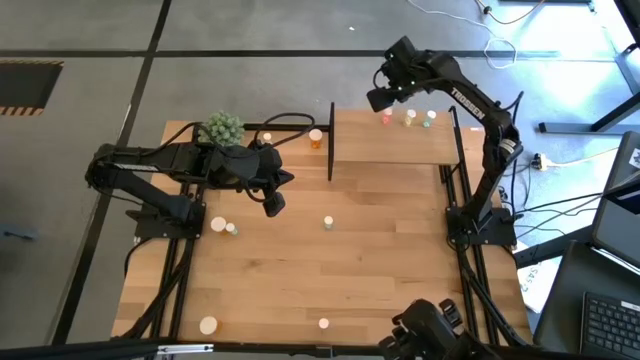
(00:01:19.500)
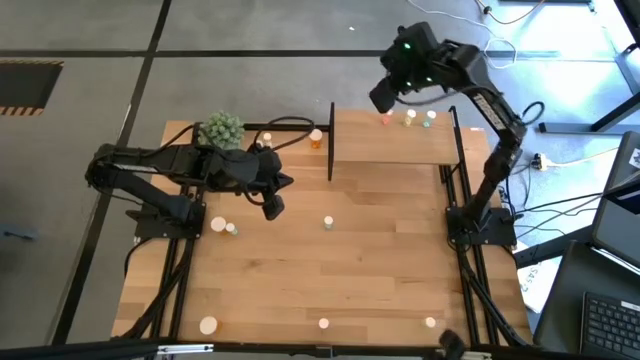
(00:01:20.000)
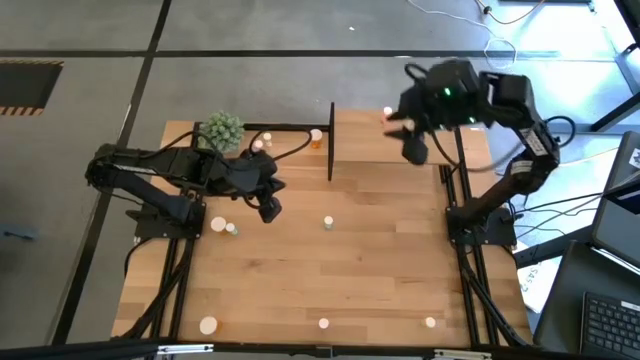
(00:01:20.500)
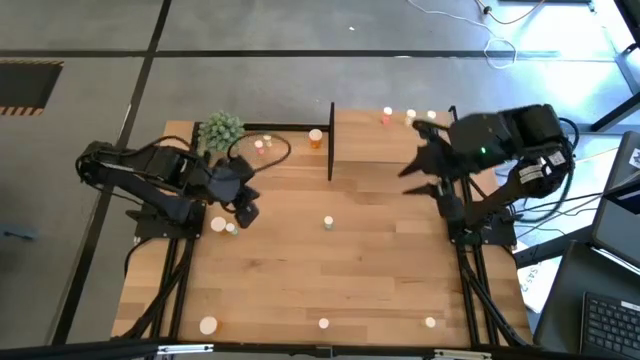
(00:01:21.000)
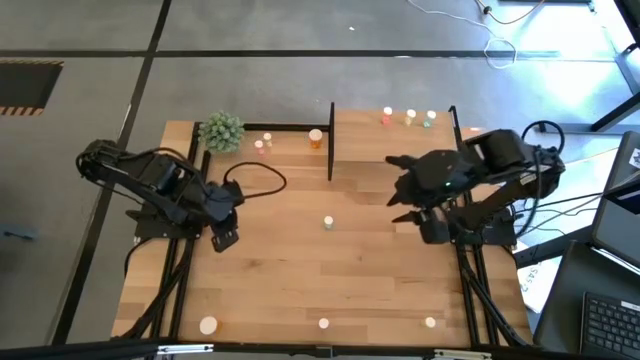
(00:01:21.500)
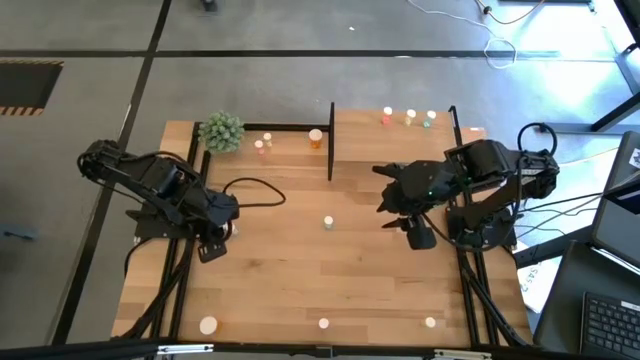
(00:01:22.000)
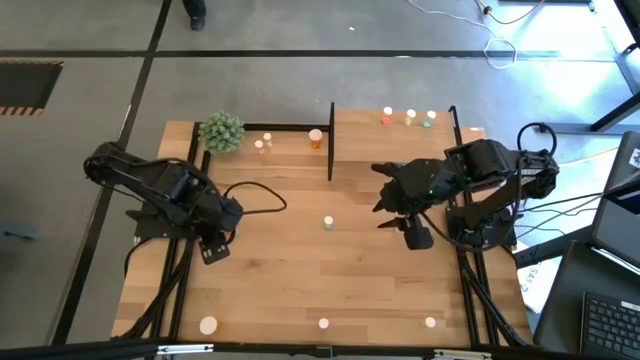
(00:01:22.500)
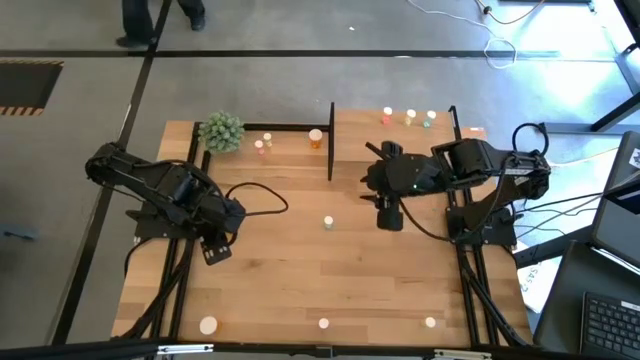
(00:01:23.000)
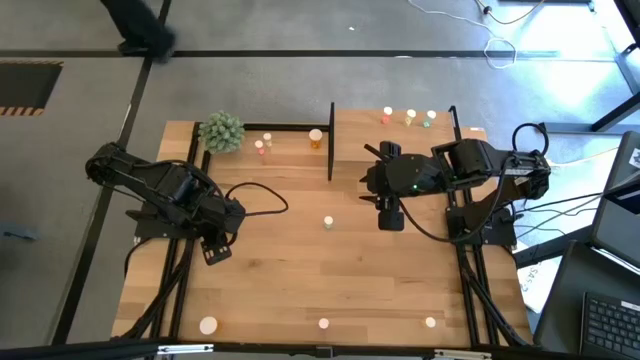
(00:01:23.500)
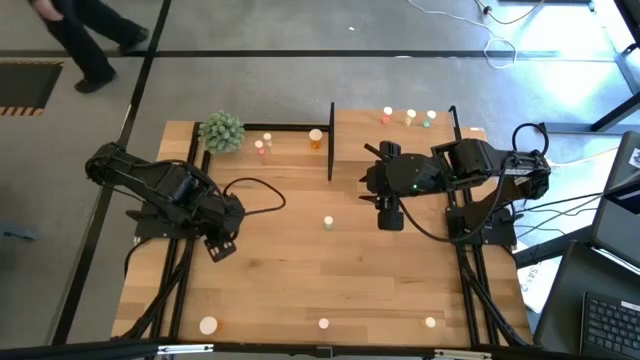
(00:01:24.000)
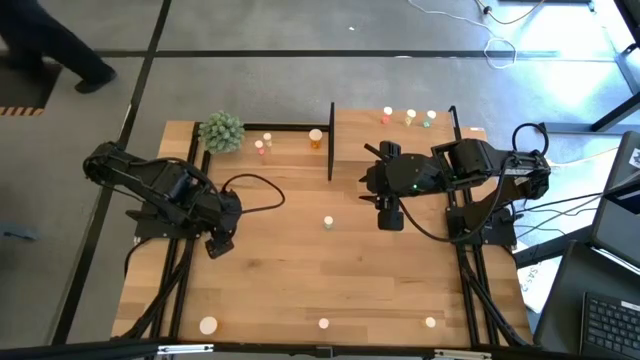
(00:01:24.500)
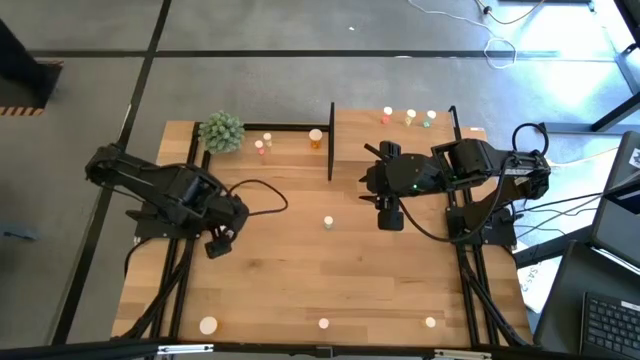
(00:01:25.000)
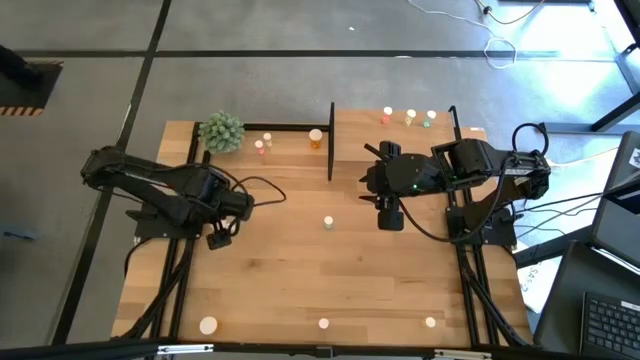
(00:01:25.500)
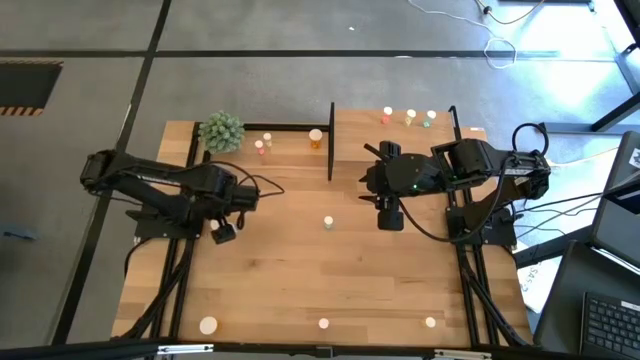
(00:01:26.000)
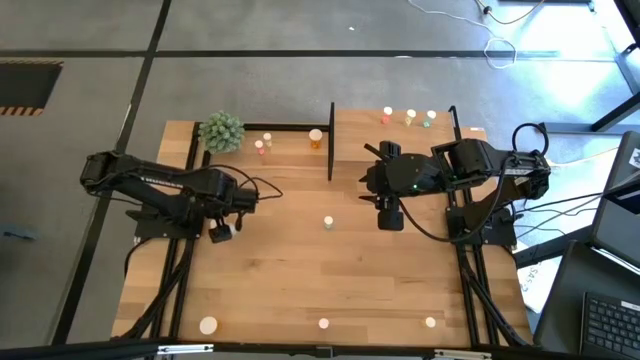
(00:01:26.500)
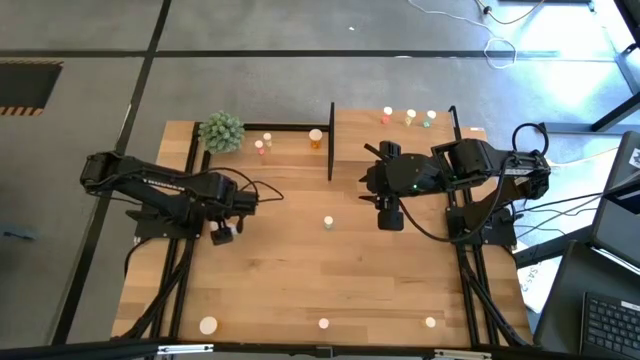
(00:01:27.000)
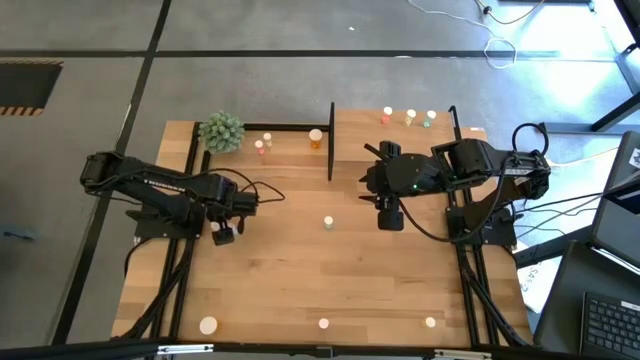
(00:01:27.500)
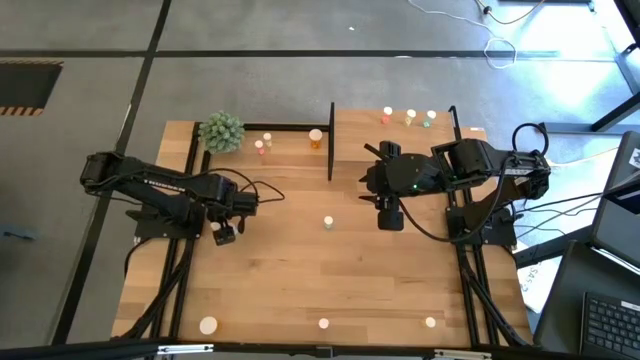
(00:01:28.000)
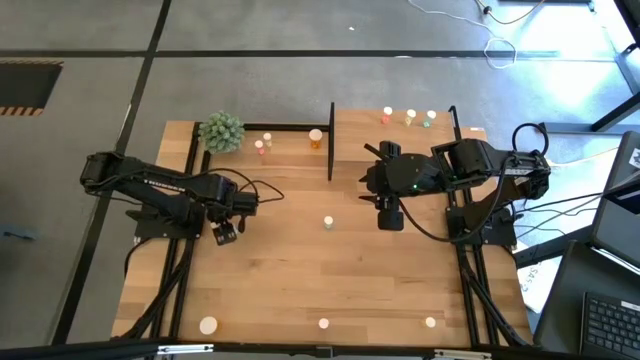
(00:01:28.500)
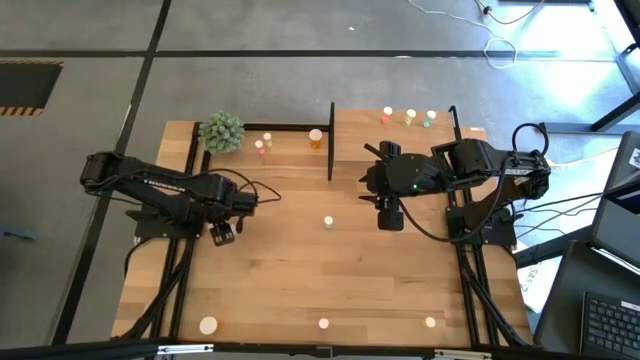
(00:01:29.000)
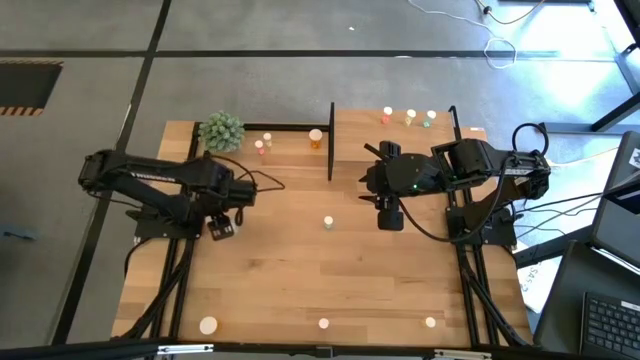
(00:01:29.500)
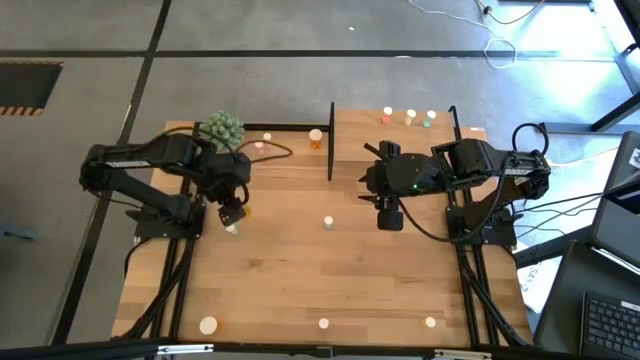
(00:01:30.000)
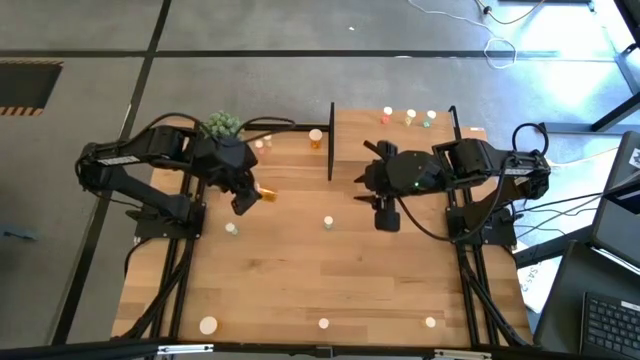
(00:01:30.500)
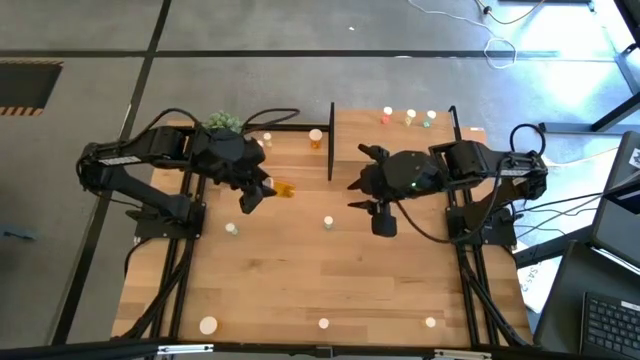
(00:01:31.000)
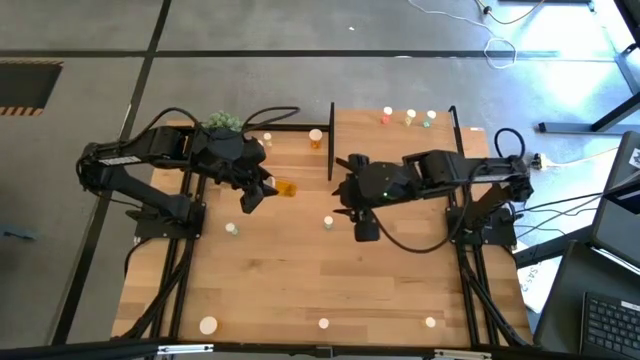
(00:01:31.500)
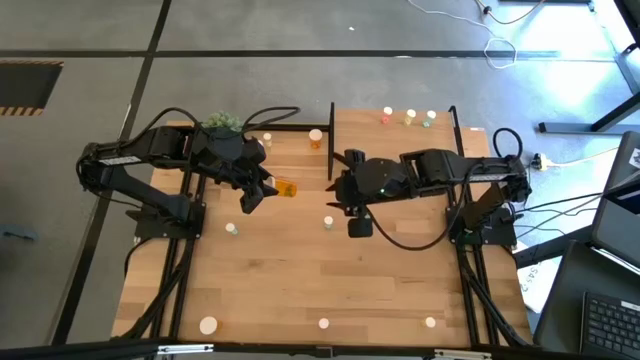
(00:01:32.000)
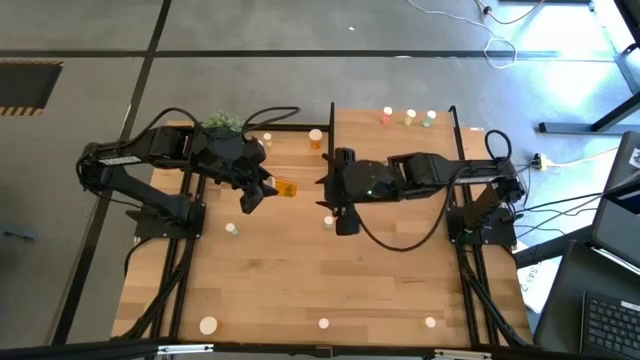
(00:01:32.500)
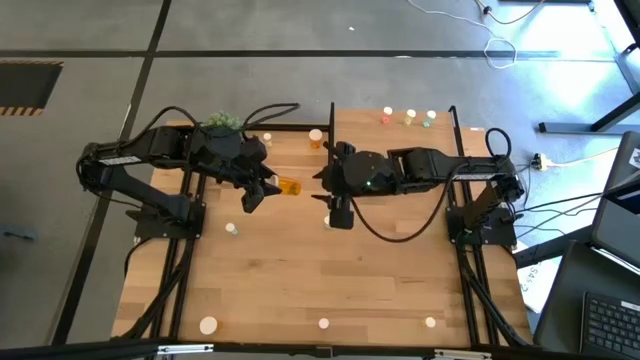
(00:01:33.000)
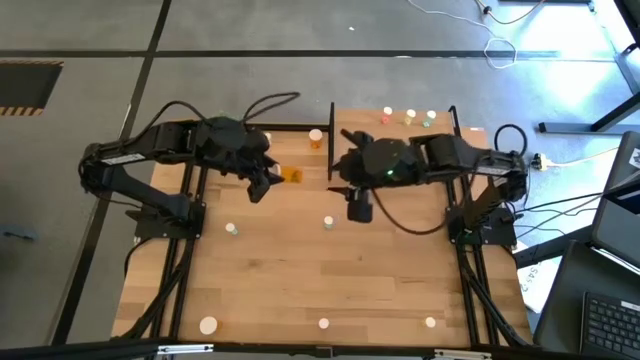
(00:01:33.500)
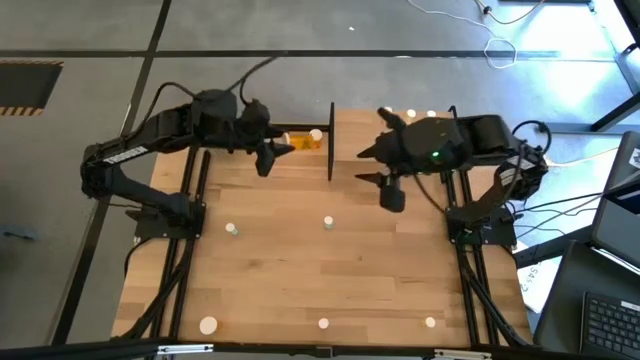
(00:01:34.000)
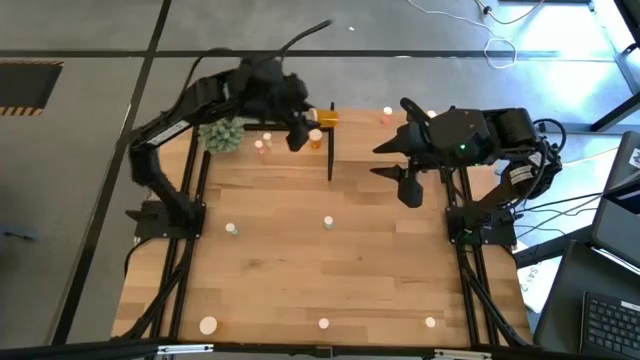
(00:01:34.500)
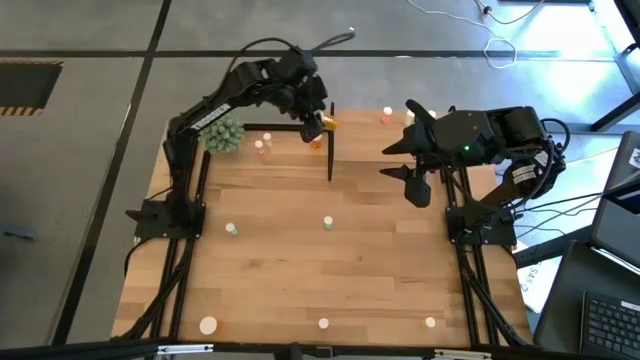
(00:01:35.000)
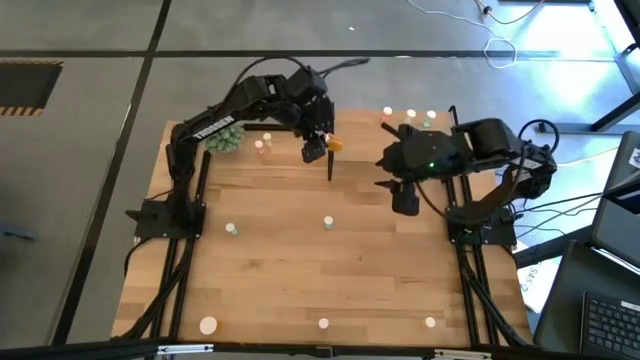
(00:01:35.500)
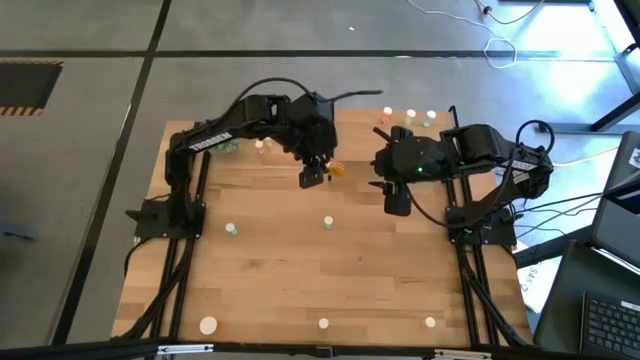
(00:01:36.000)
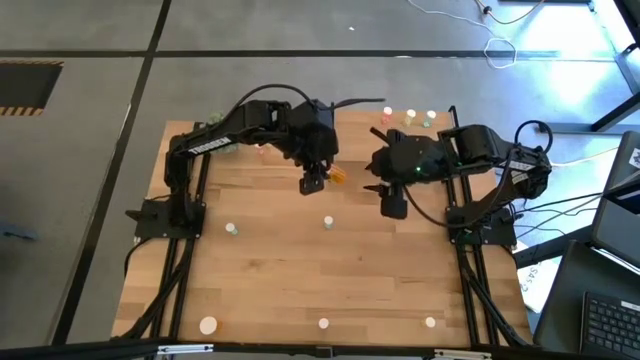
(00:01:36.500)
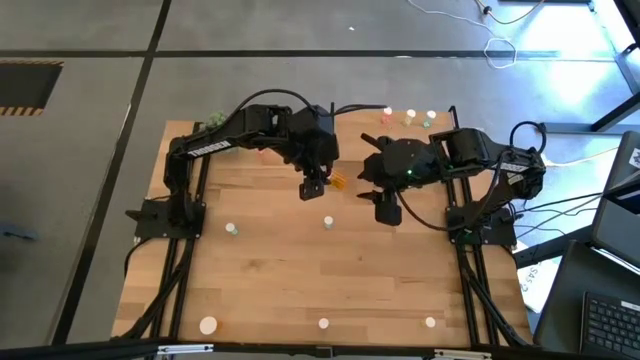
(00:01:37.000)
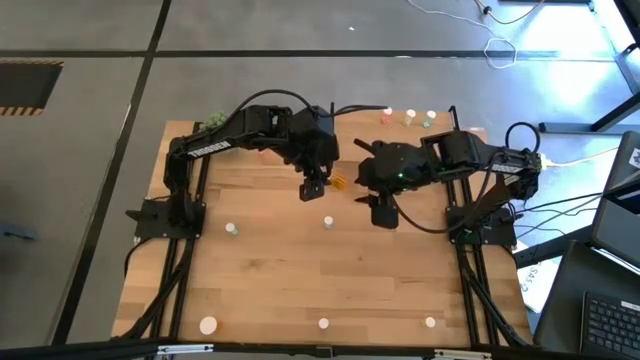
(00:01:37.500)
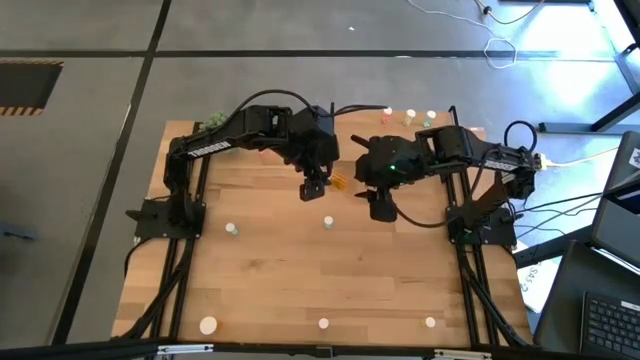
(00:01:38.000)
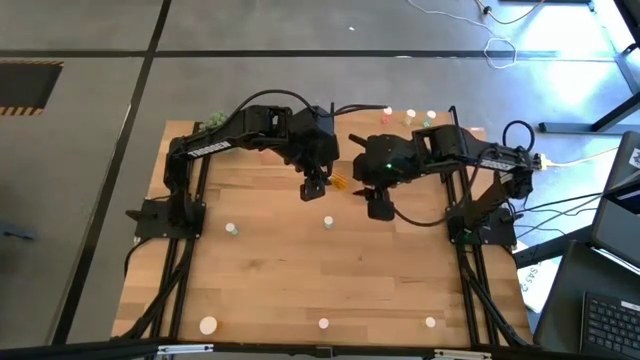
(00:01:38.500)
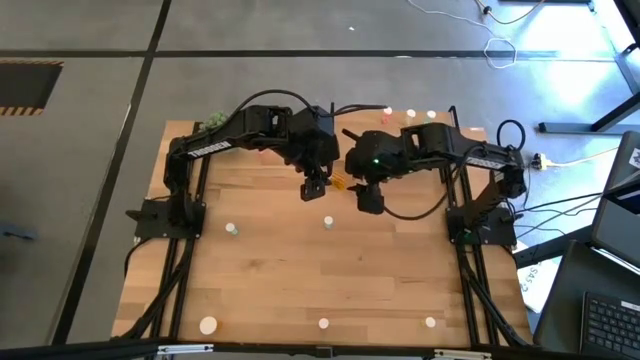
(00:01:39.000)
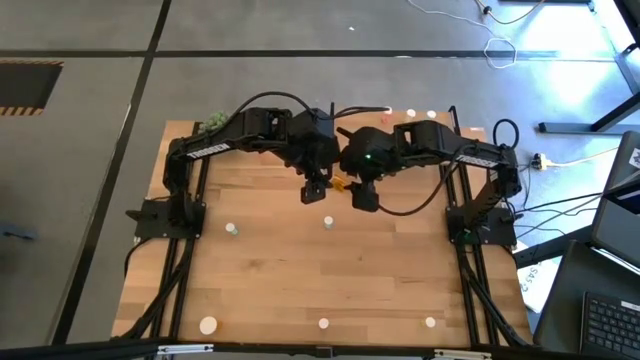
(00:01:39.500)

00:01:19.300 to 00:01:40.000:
Task: Pick and place medicine bottles onto shelf by color
Put the middle orange pill bottle on the shelf
